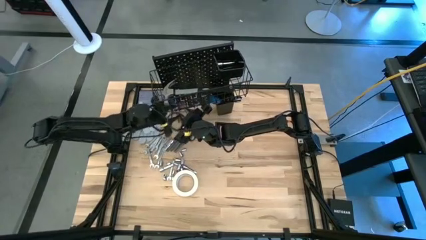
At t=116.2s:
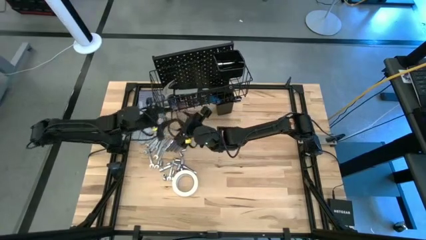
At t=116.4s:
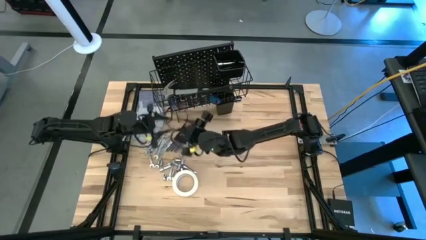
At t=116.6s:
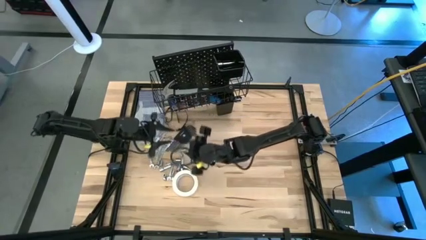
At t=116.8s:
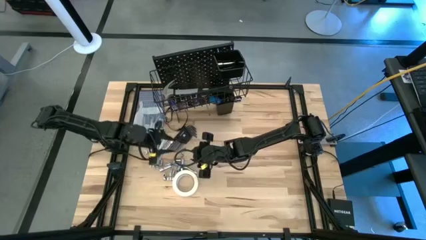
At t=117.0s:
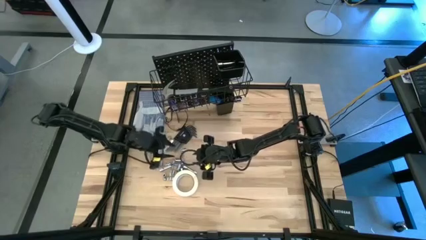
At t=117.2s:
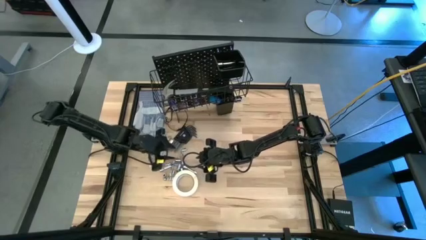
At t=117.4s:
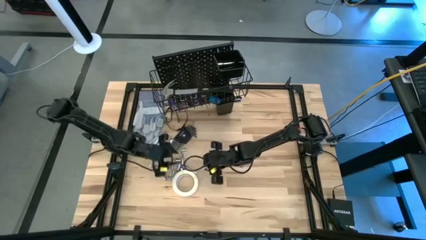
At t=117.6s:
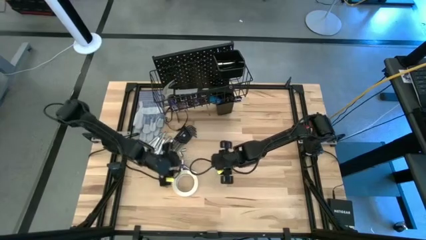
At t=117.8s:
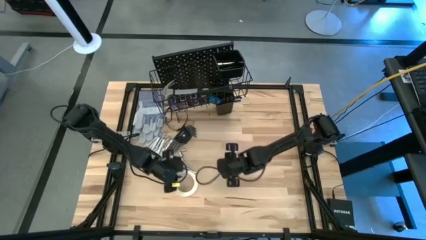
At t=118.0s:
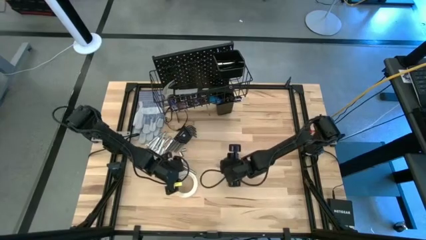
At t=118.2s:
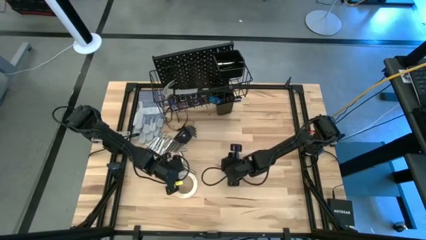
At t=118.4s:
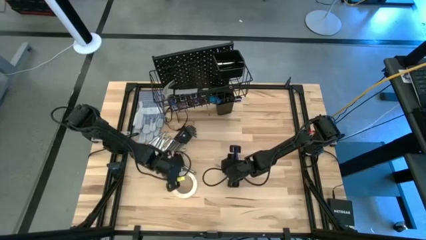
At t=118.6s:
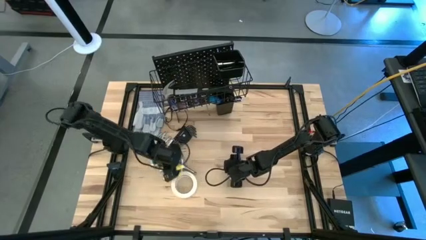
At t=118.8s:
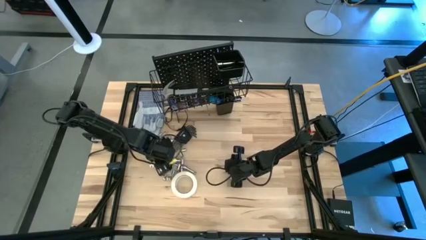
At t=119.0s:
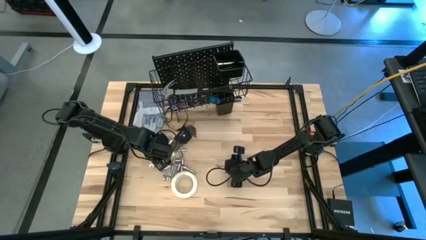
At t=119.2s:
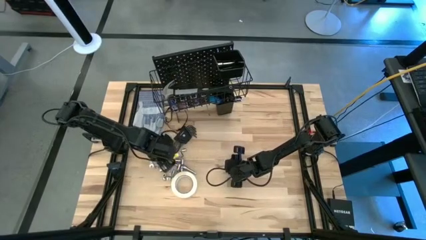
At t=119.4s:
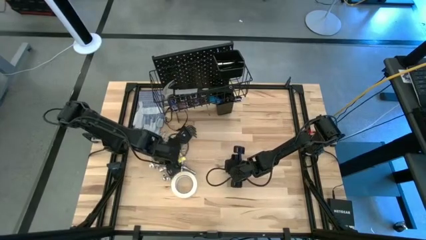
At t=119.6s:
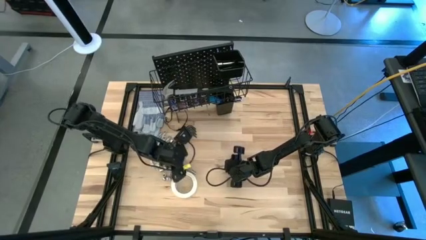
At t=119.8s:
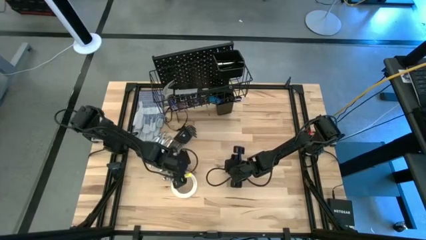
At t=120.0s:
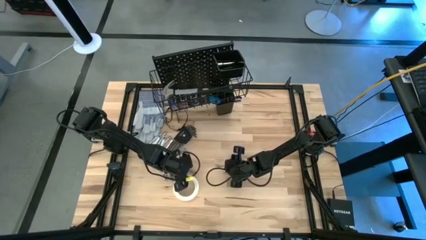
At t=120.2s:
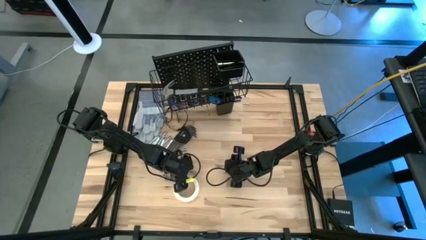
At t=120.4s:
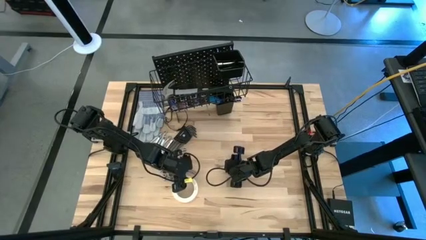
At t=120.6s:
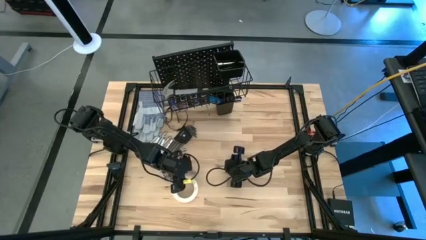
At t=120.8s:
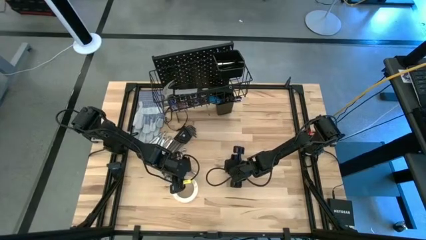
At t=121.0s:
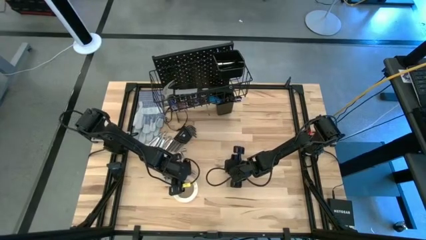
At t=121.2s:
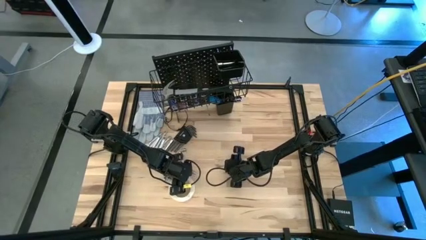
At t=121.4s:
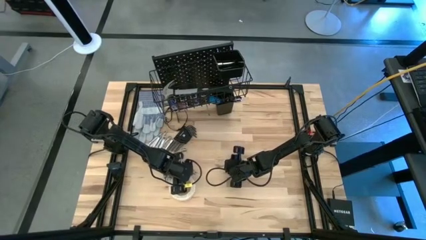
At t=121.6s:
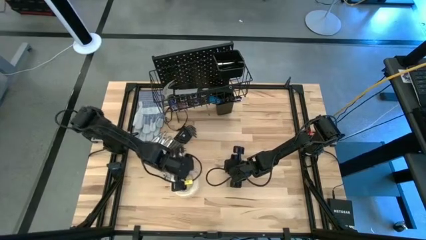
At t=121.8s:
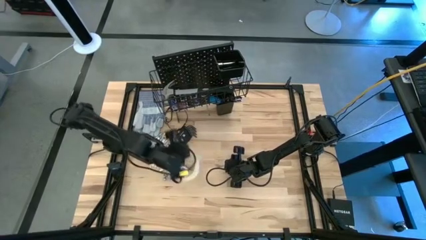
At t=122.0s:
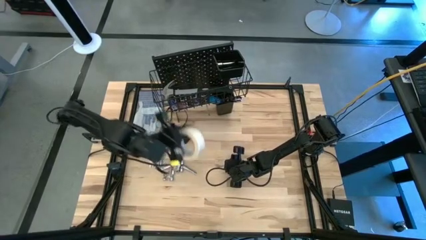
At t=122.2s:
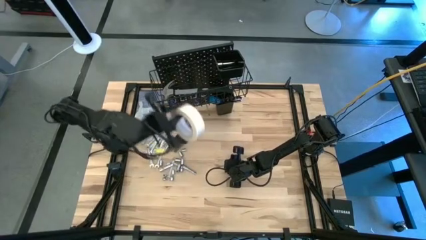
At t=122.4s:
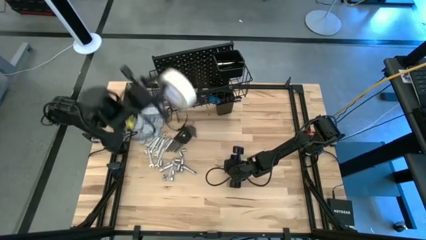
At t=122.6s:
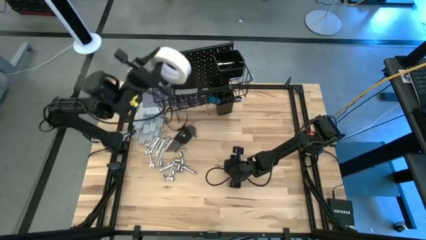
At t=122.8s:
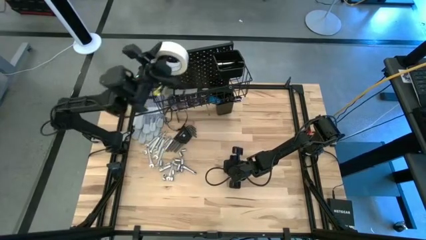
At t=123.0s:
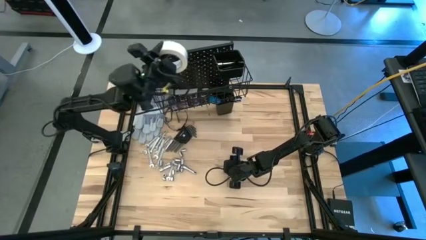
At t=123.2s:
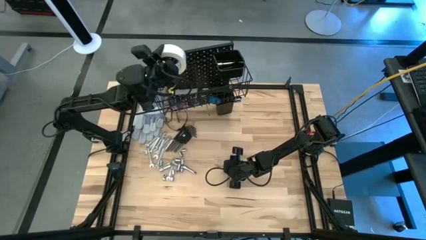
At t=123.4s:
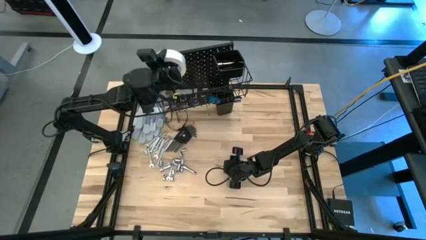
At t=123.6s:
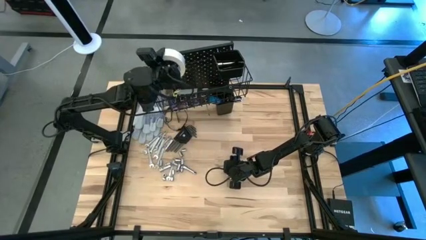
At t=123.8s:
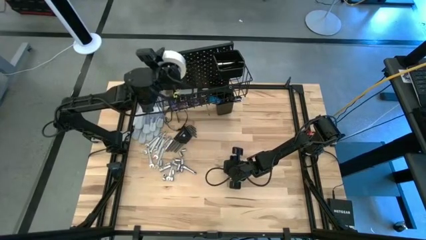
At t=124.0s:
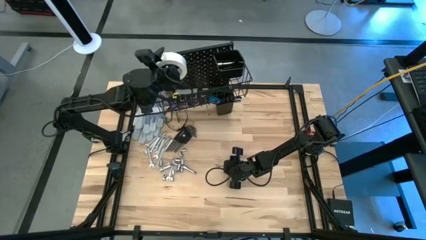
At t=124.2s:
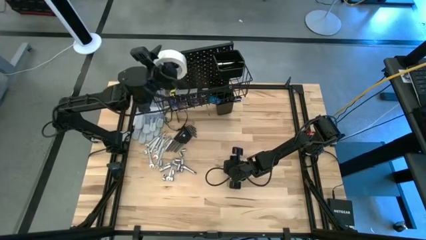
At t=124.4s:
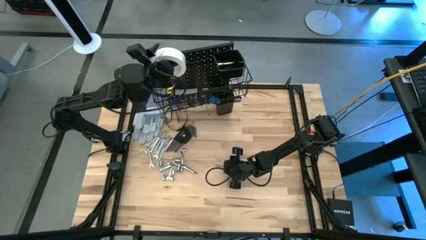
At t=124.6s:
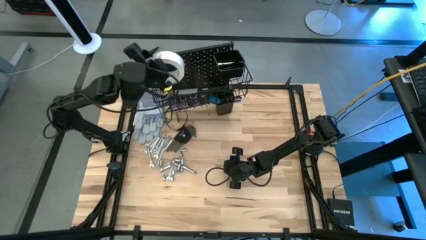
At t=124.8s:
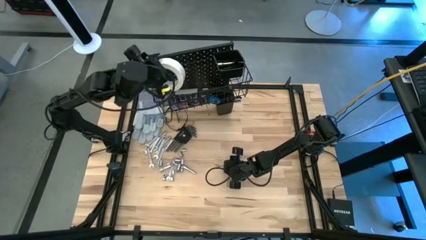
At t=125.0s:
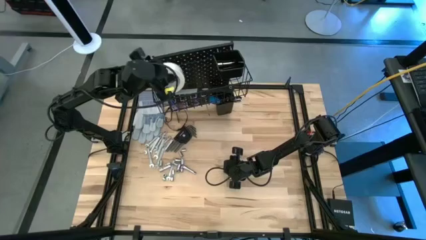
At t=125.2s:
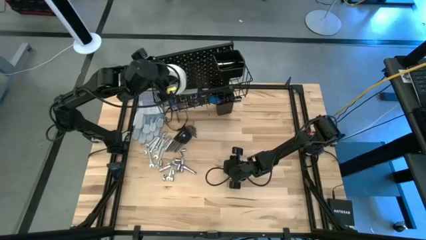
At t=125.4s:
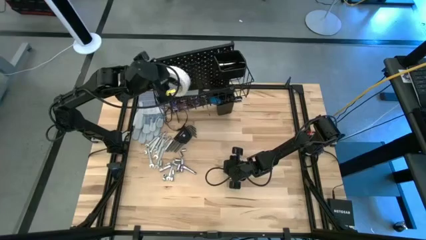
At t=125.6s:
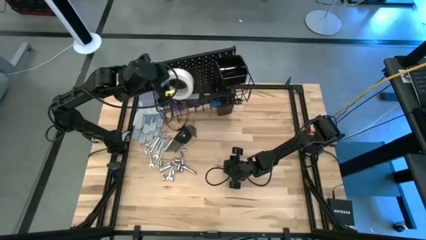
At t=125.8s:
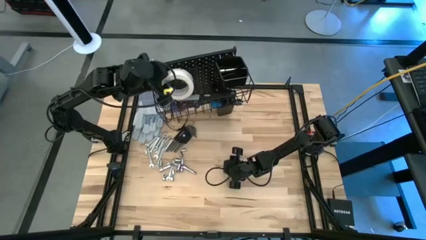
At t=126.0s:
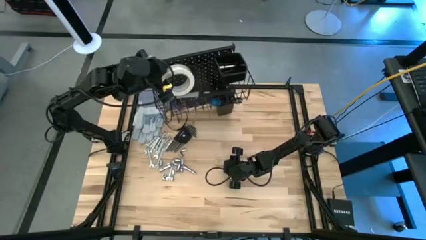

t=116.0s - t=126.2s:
Task: Hang tools onto peg board
Put the white tape into the wire basket on the pegboard

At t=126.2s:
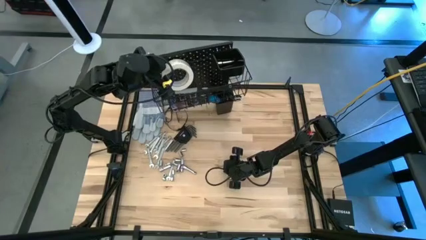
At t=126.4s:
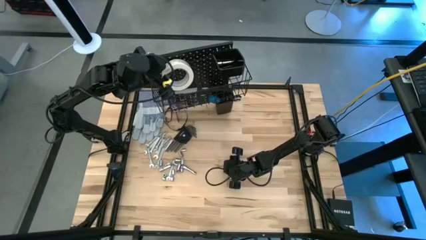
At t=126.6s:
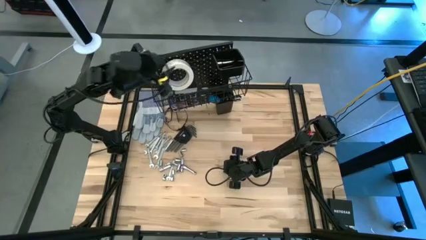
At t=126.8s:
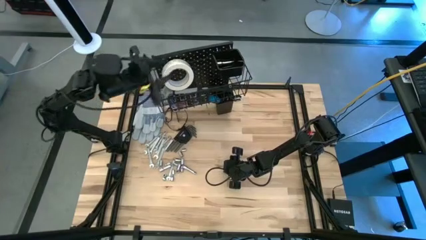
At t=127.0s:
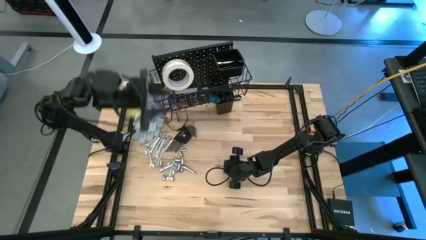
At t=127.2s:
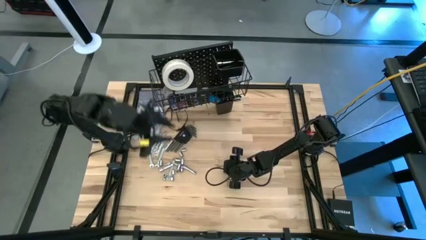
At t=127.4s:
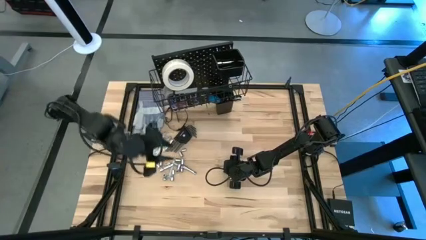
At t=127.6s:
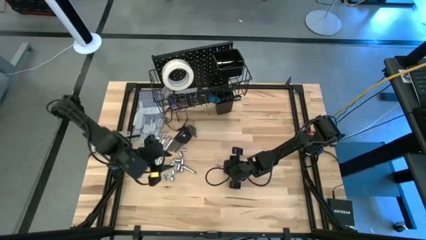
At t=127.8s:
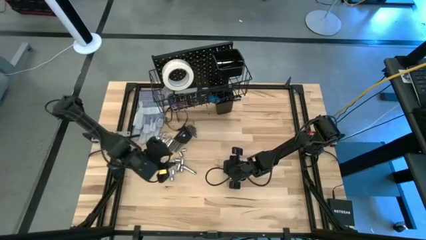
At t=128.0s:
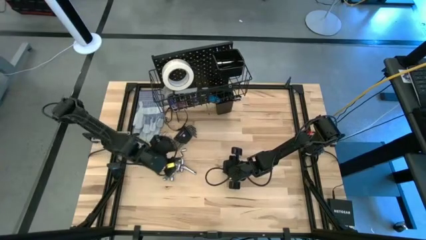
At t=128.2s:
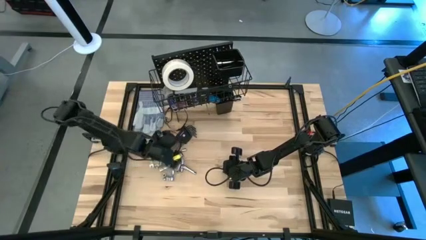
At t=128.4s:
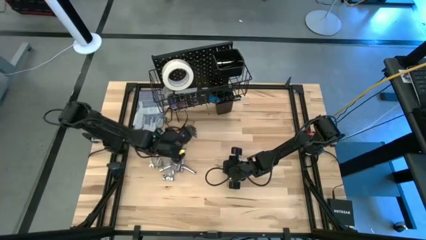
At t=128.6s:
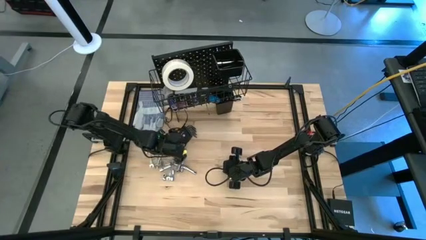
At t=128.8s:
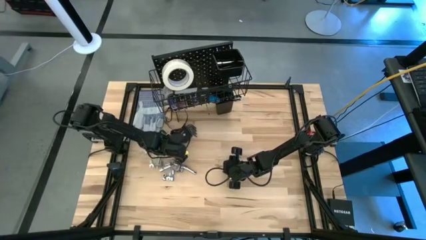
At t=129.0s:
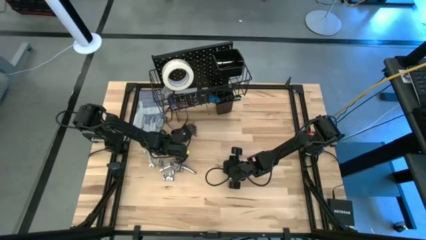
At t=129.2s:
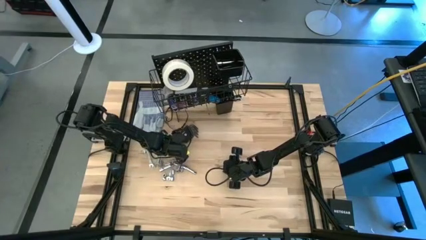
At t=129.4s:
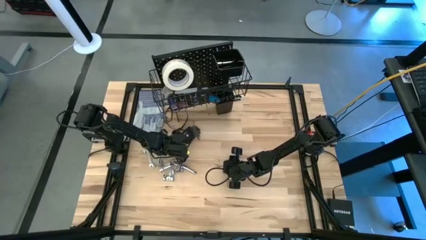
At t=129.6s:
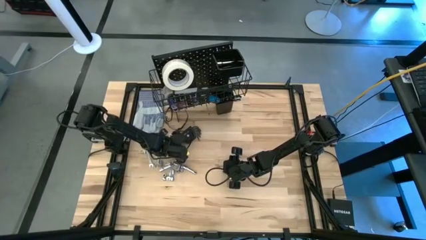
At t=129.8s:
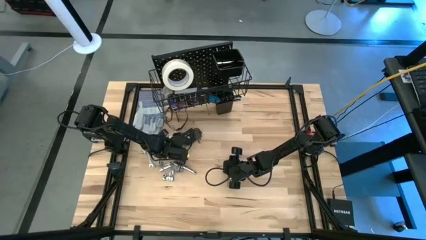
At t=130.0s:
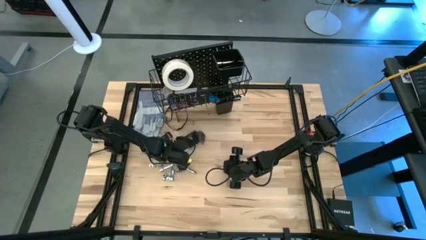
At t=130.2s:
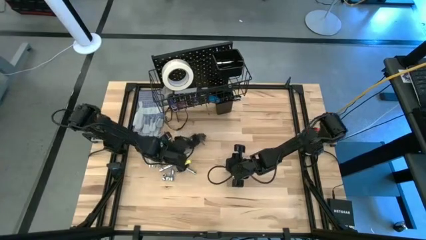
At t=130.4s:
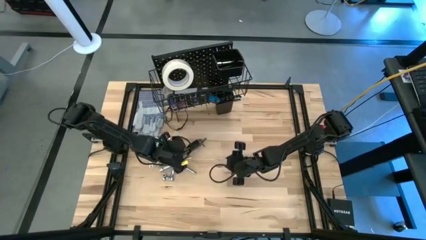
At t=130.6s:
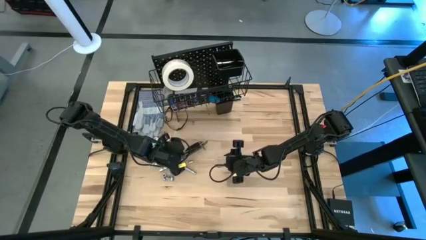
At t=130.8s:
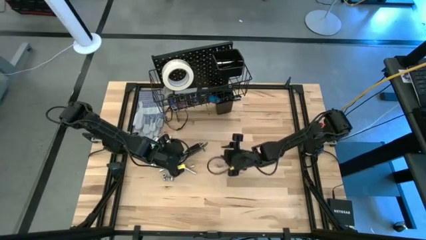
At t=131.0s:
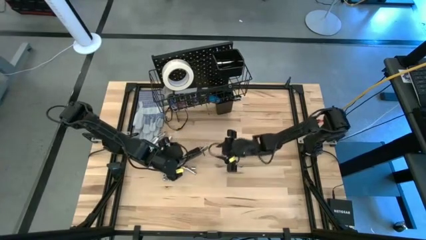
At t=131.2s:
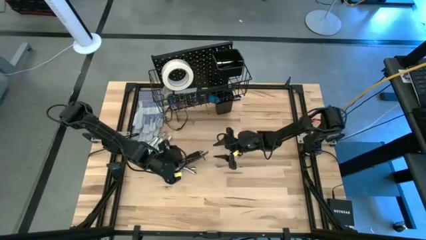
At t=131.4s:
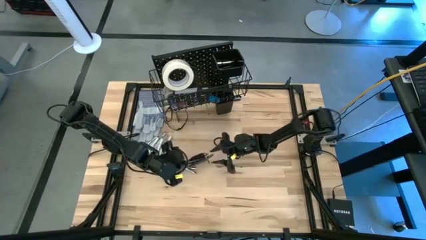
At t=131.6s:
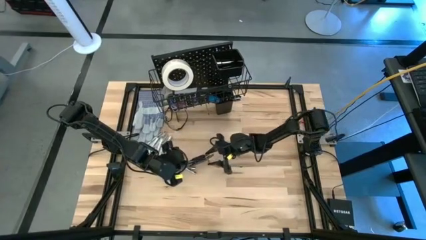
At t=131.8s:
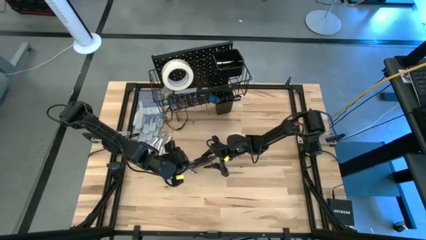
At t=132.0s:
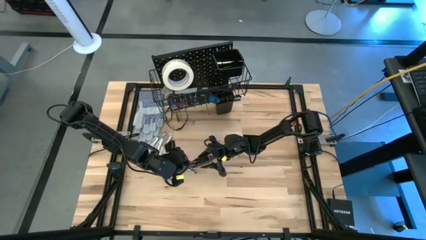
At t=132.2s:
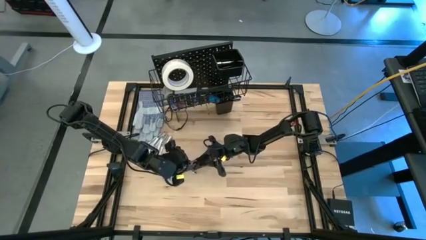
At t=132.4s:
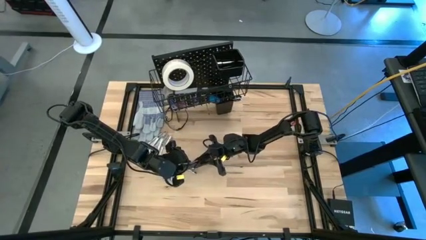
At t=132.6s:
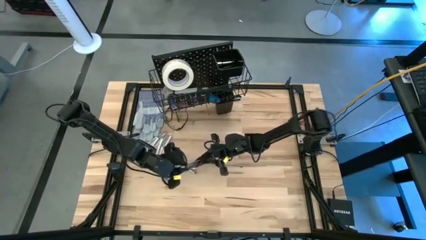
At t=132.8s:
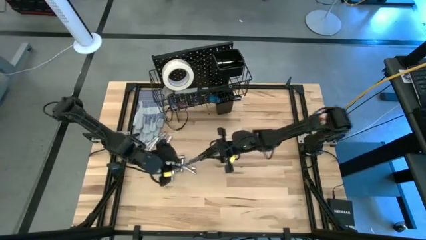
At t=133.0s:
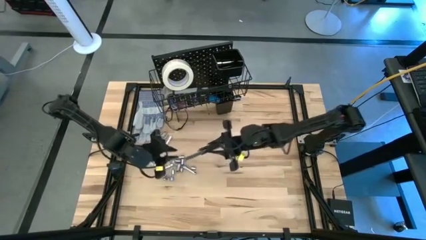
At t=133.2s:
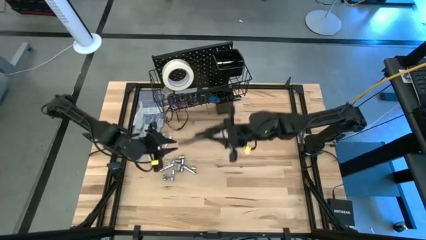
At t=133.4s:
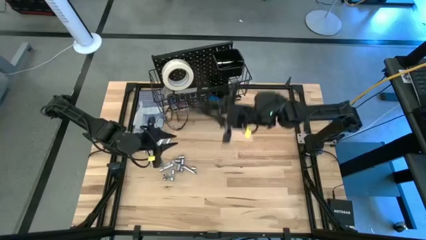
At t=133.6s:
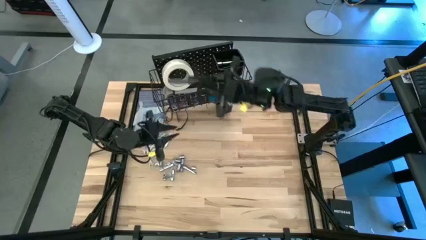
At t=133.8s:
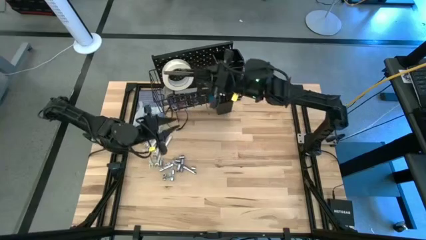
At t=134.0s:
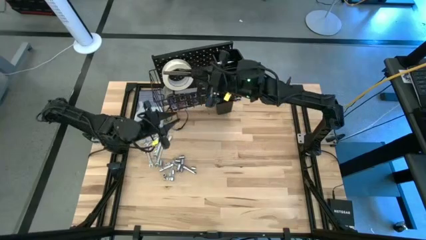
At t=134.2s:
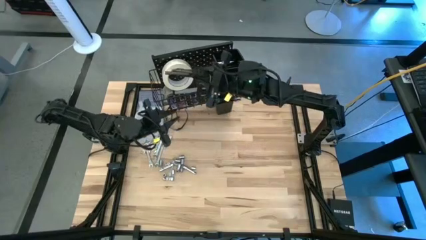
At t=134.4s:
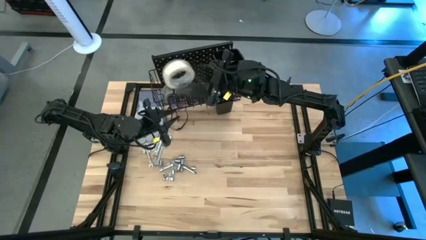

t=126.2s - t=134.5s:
Put the Allen wrench into the wire basket on the pegboard
